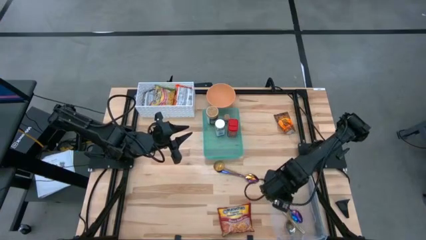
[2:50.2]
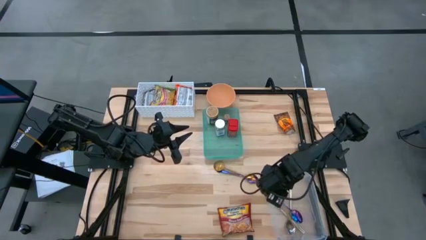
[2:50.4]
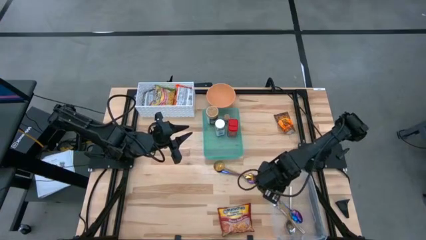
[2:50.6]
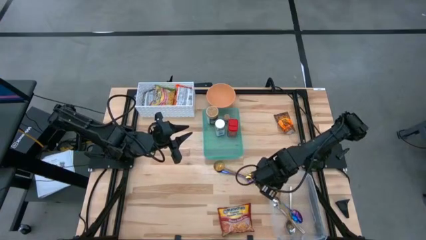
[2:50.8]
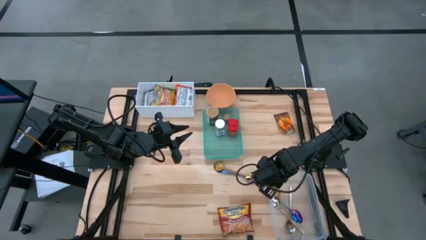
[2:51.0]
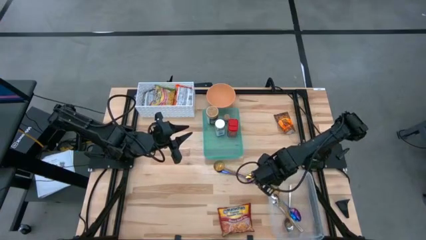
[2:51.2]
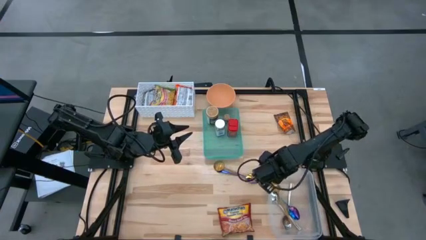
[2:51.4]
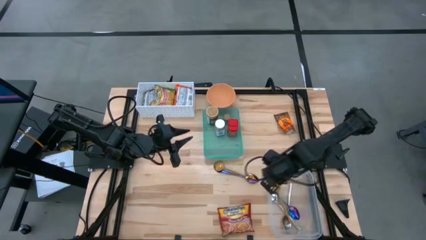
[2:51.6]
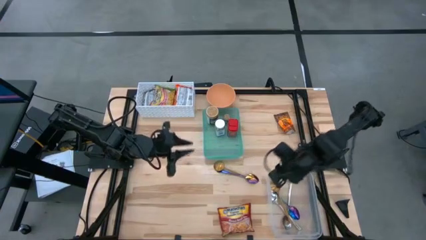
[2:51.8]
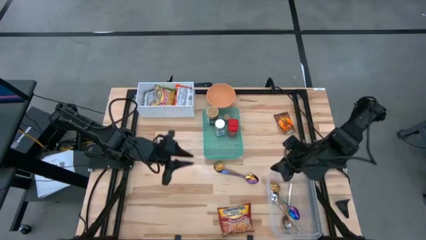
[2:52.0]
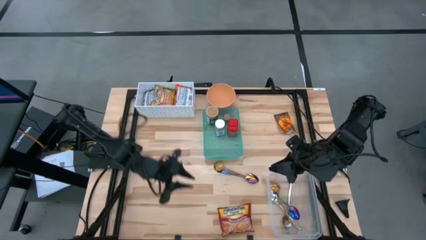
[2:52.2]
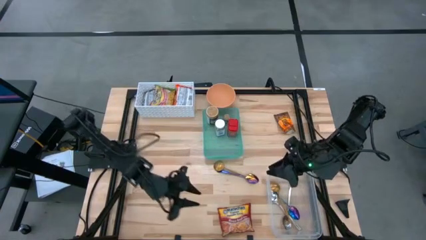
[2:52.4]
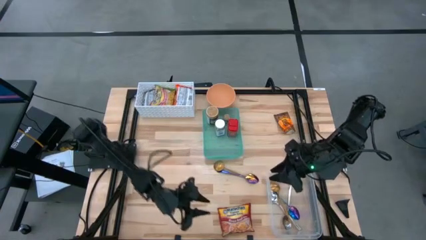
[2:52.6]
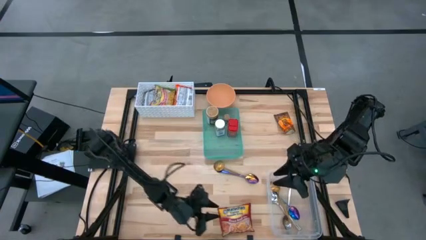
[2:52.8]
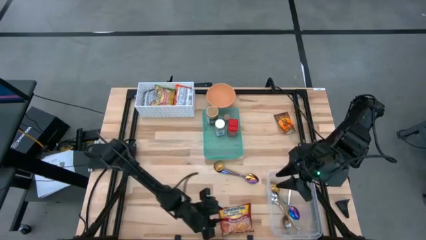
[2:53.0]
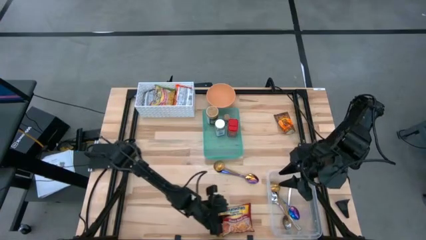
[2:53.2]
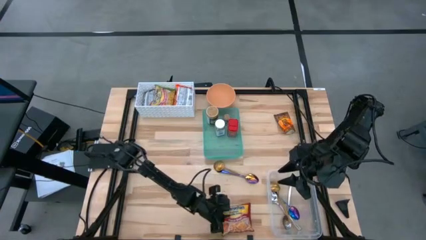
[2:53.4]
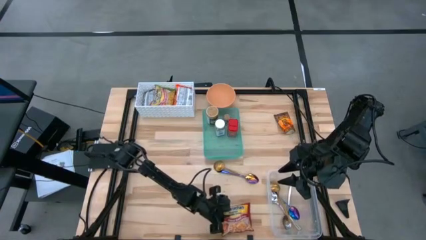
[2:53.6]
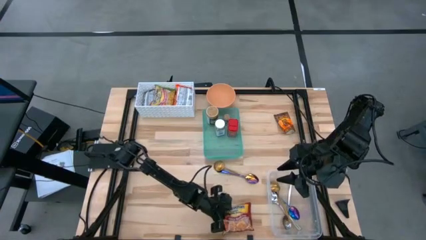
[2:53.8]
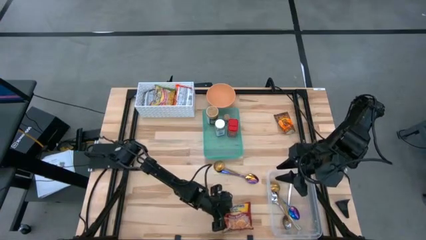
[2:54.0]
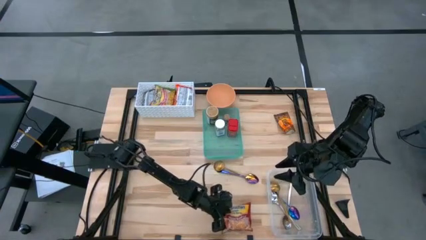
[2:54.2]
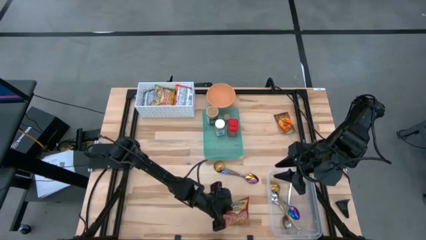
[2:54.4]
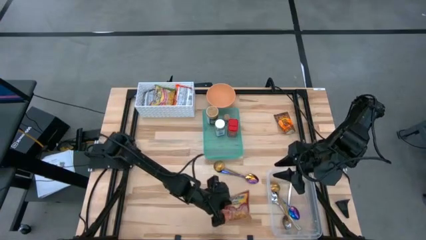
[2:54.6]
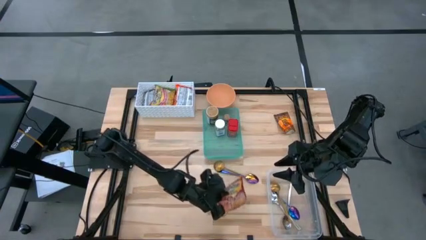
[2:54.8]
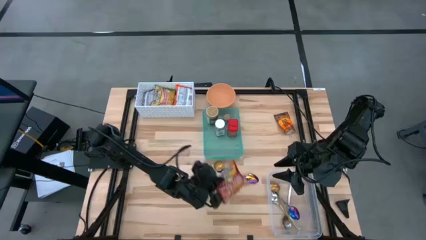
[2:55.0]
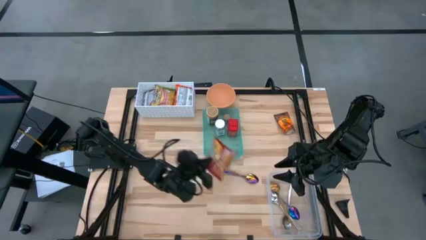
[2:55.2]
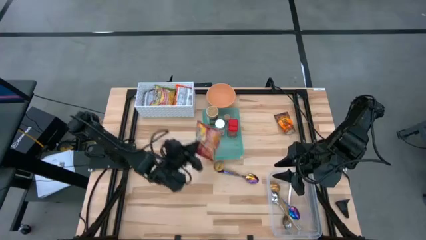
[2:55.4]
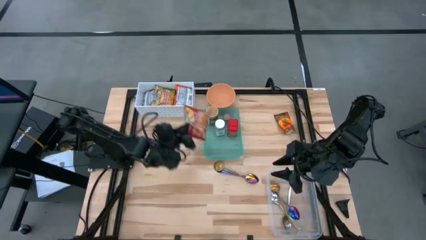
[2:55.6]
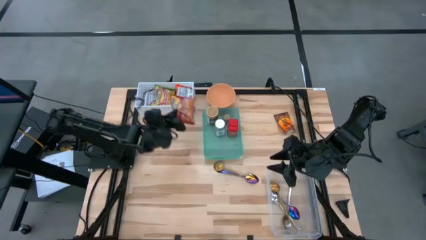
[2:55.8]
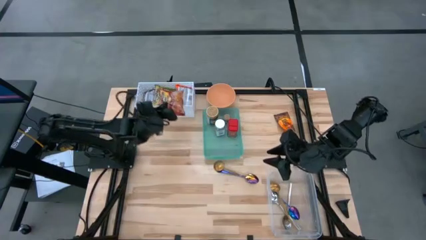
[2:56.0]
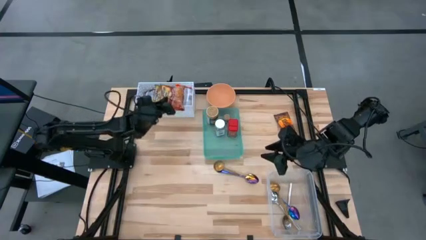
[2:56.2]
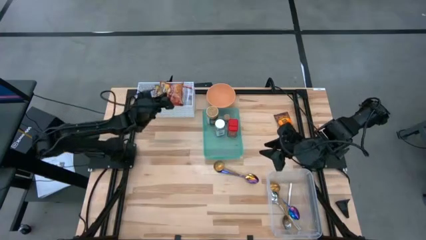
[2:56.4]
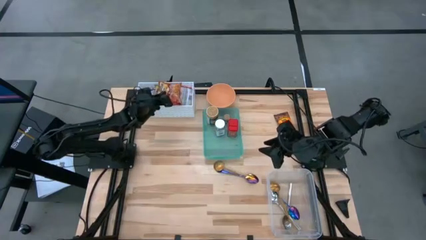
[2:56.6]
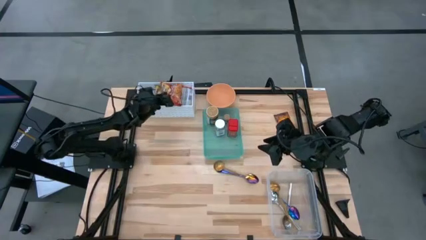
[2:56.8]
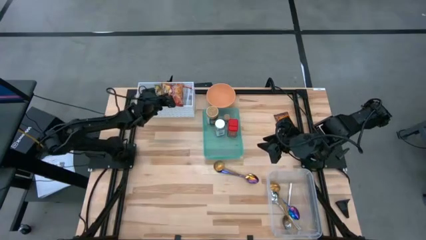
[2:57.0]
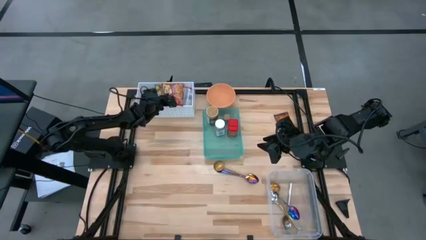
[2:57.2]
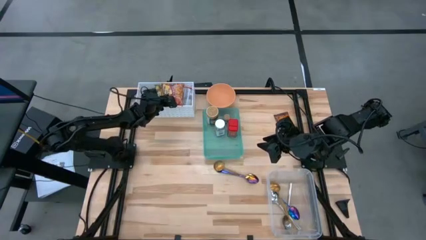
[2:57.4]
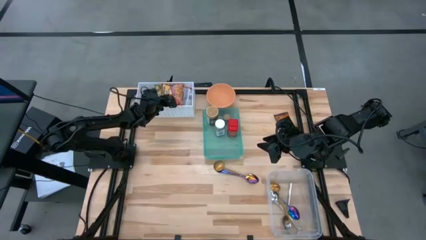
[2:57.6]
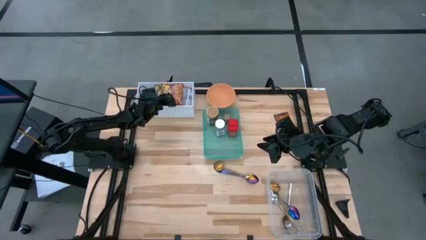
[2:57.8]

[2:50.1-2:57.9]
Task: Pick & Place Food Item
Put the red noodles pack into the white bin

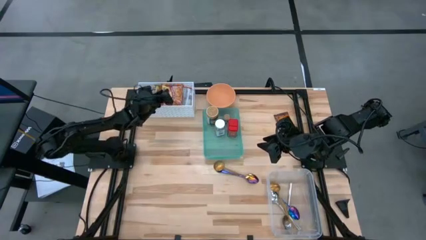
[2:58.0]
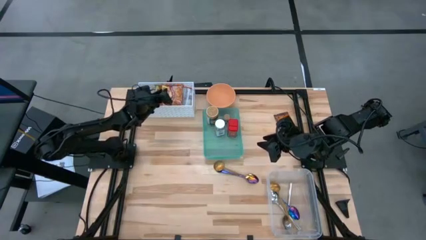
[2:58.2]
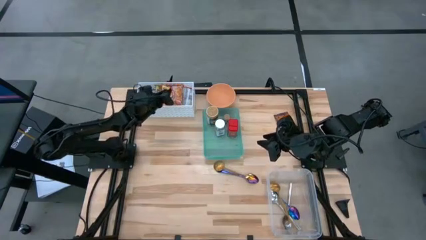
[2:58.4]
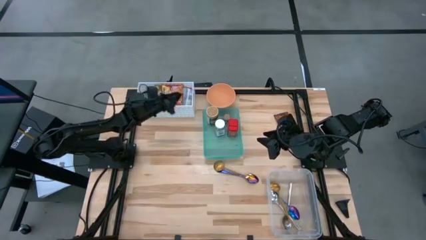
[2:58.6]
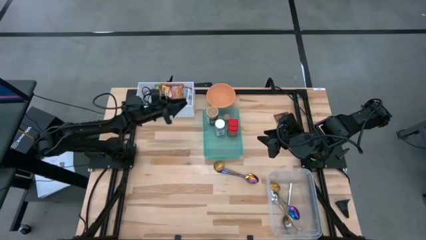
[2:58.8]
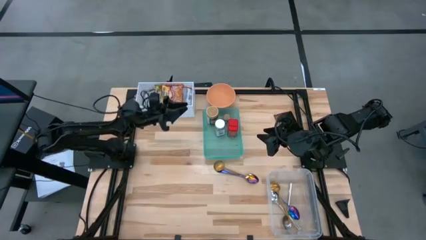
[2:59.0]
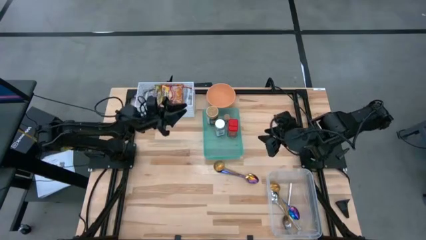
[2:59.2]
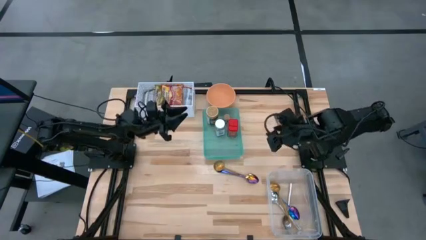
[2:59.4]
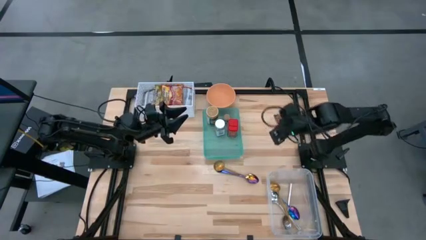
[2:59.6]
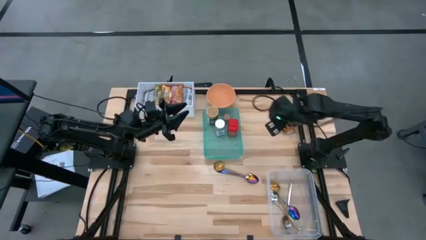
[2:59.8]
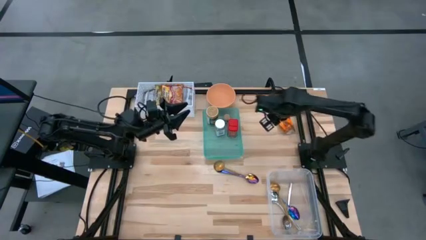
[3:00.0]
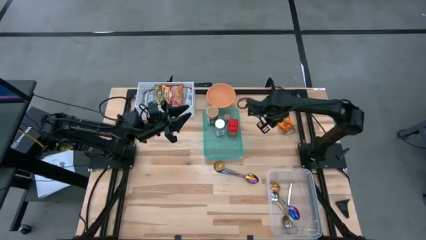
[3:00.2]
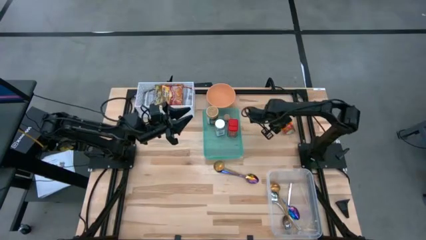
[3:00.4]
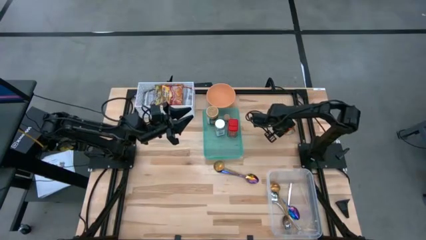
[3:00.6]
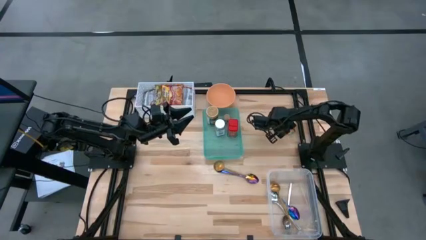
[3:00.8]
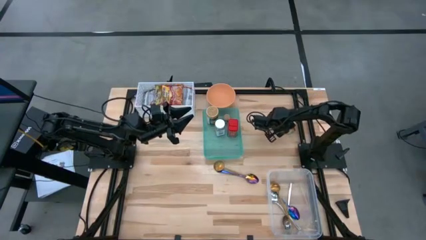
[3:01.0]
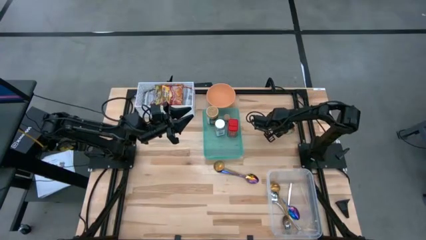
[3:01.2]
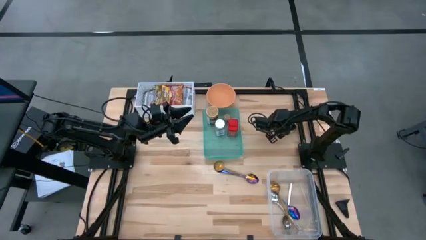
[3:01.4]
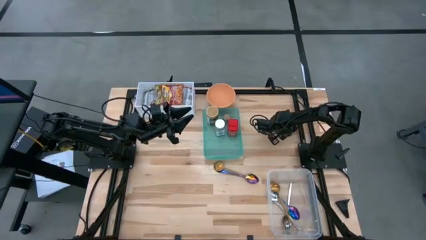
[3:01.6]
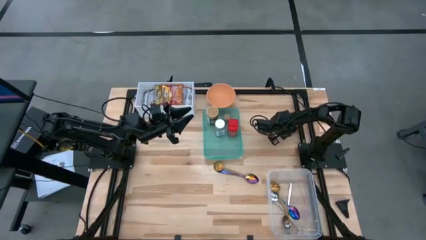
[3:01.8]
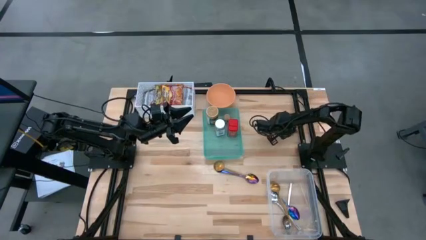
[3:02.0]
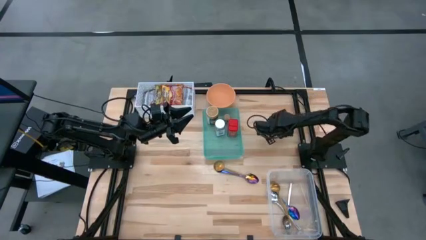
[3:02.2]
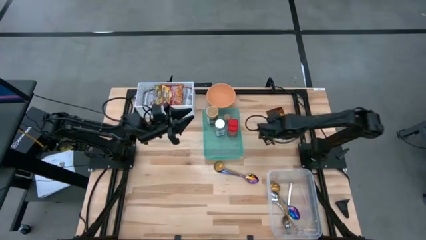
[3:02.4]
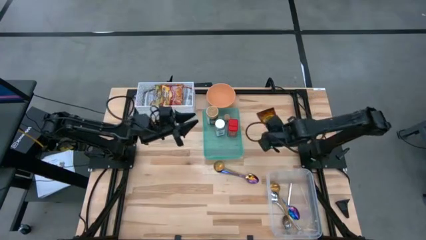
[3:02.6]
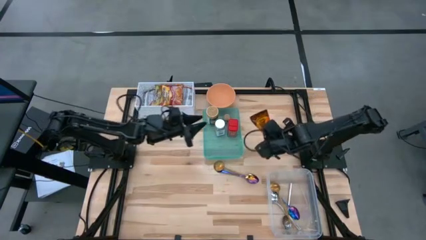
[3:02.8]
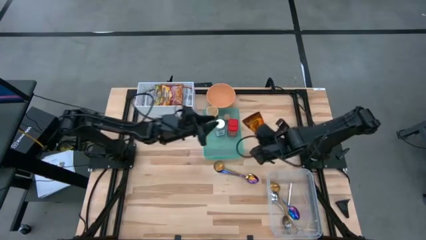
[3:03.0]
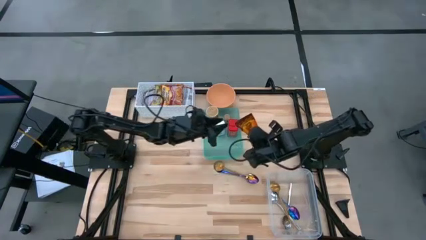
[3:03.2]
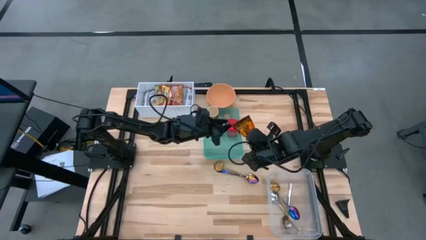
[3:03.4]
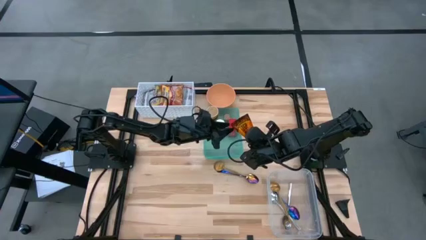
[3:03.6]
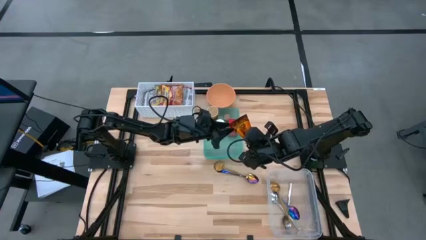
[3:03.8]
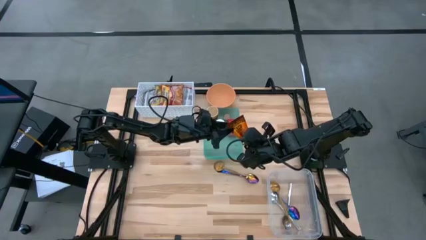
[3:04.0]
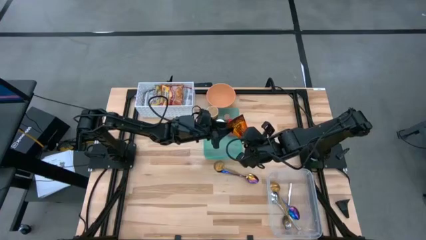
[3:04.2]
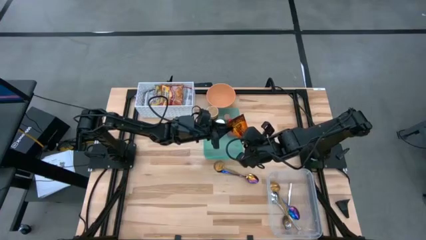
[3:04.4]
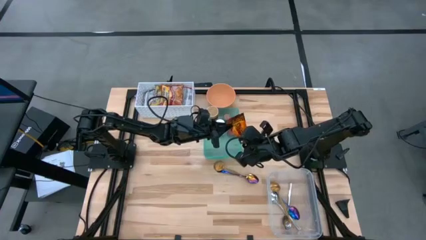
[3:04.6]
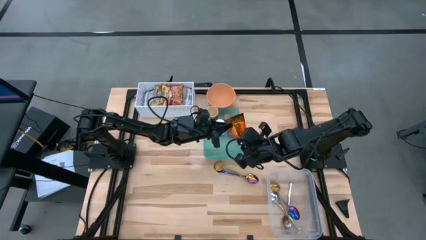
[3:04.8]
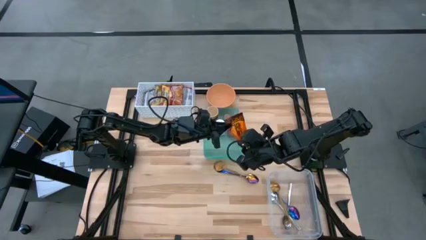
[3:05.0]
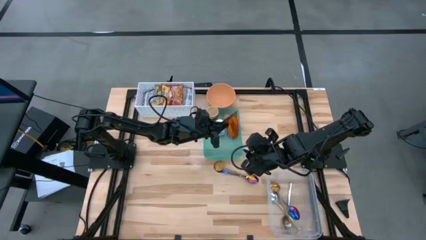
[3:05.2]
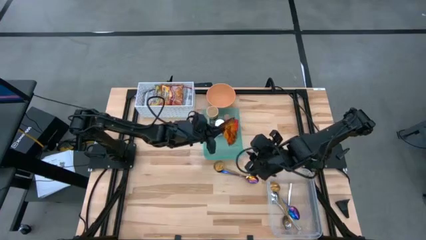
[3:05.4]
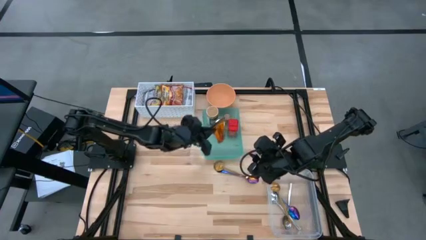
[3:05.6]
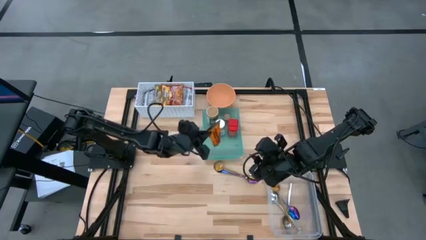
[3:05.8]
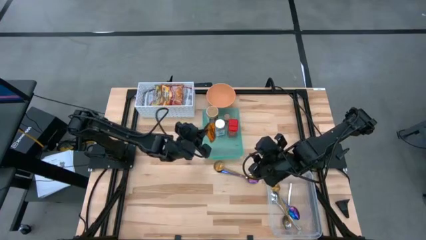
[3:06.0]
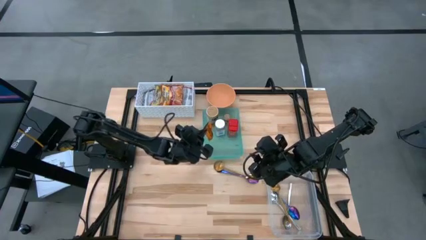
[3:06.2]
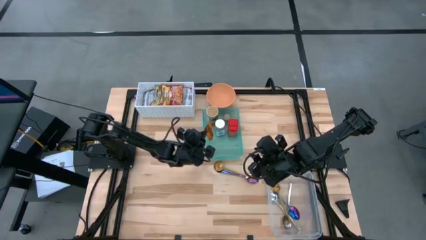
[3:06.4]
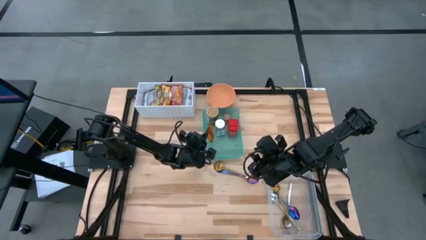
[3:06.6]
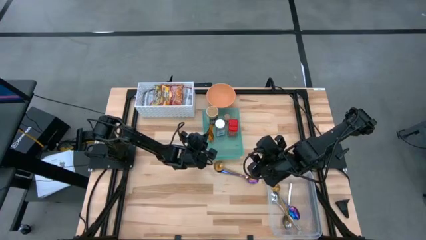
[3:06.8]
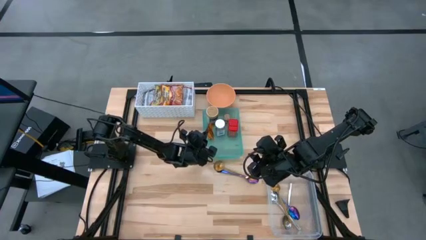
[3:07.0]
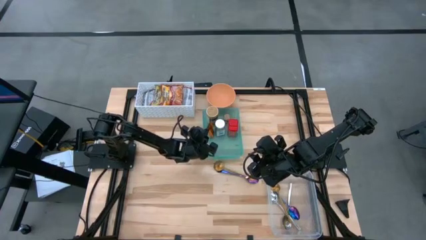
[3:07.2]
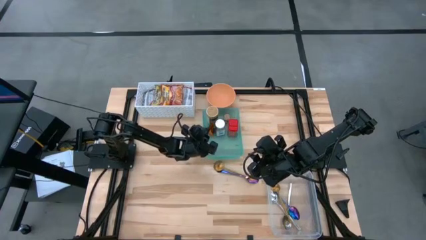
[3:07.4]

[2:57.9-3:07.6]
Put the orange seasoning into the blue bin
